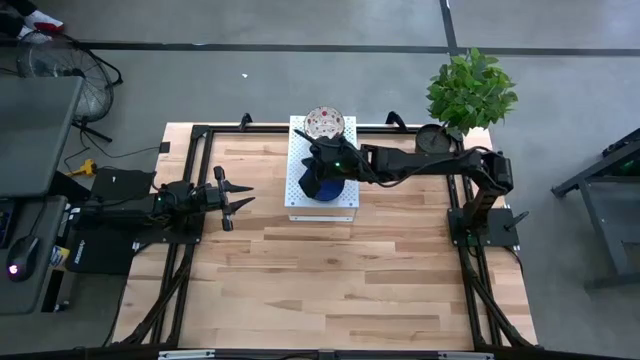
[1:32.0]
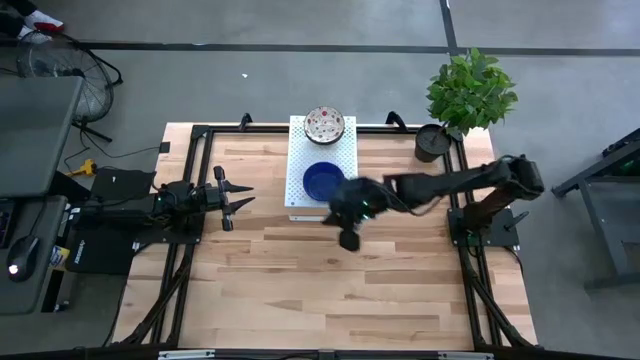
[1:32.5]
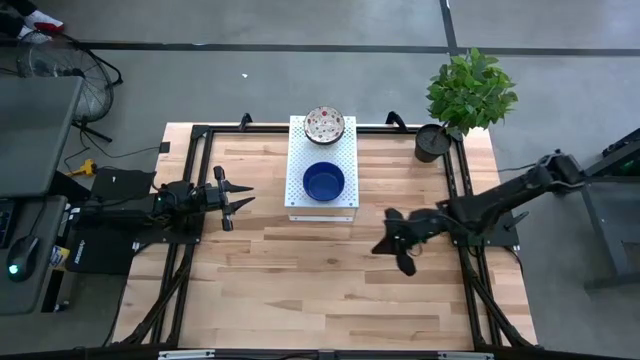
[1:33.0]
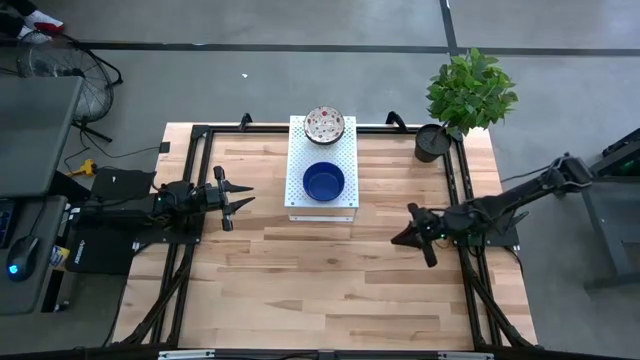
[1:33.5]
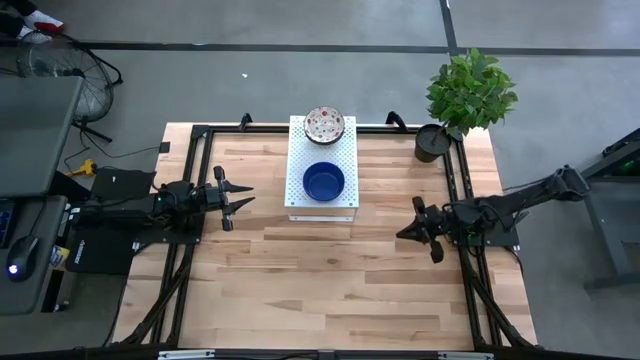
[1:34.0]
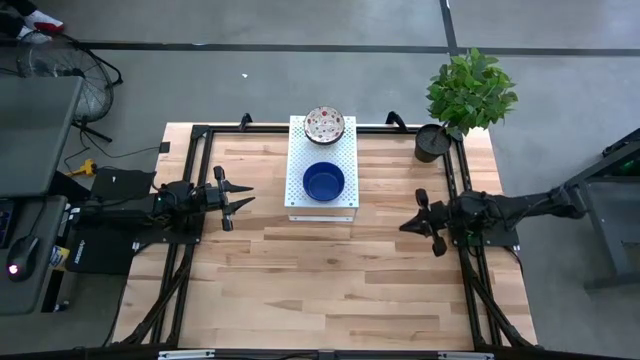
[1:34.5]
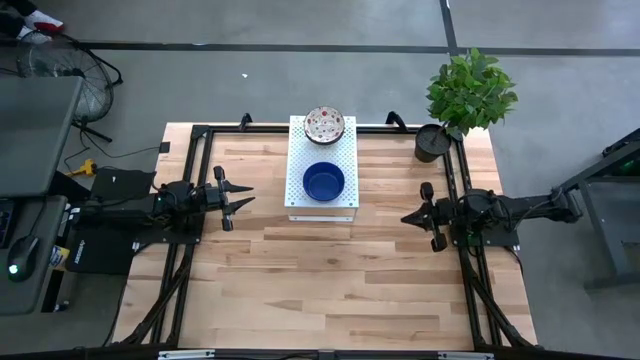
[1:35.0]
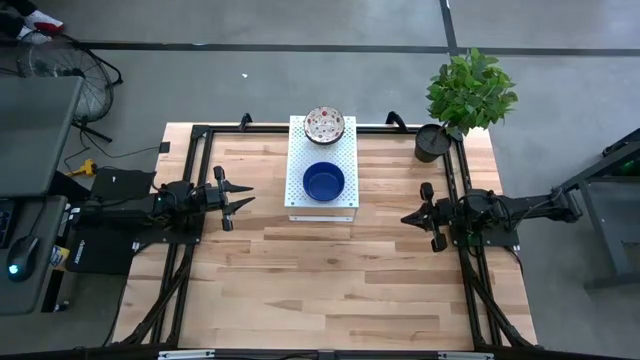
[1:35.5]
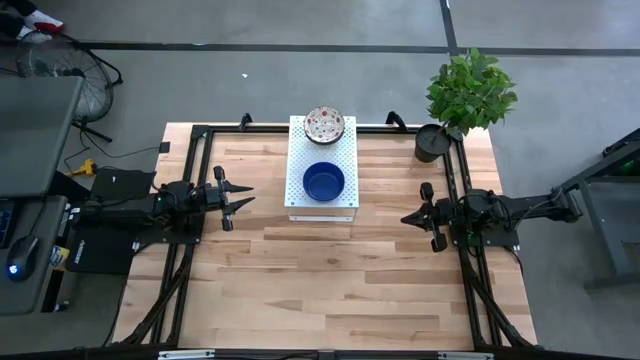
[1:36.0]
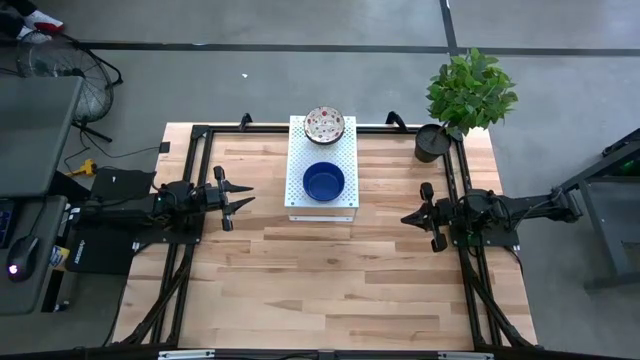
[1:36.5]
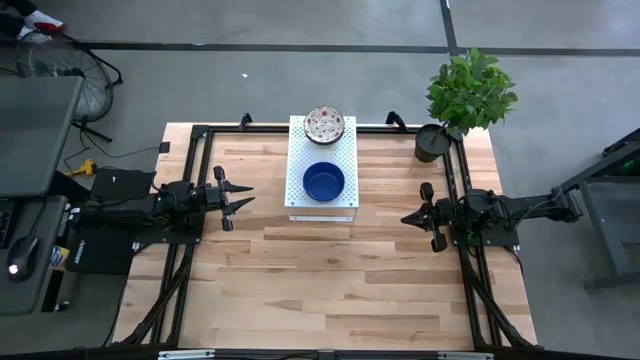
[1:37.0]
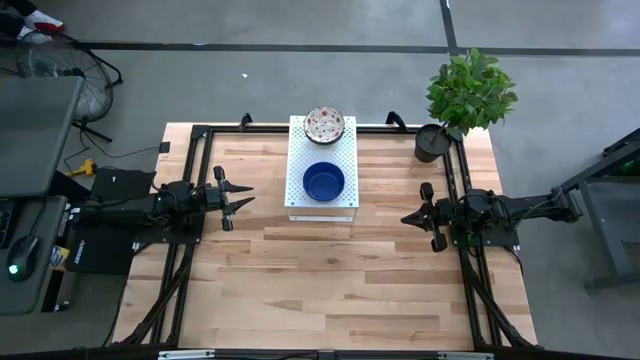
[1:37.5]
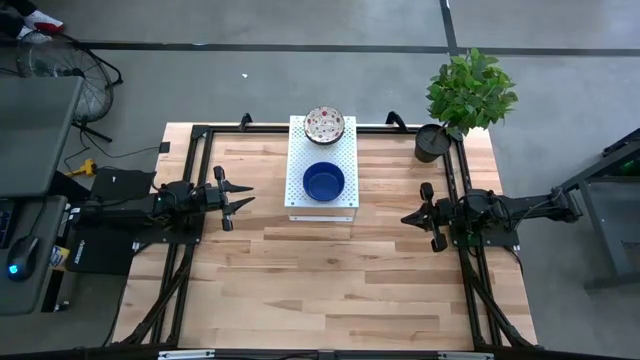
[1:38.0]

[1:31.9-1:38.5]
Task: Pick & Place Mini bowls
Return to Home Position

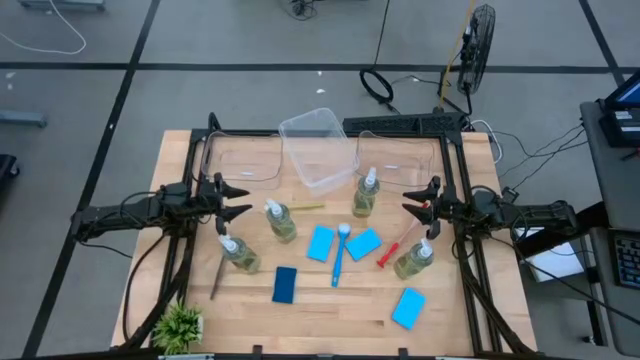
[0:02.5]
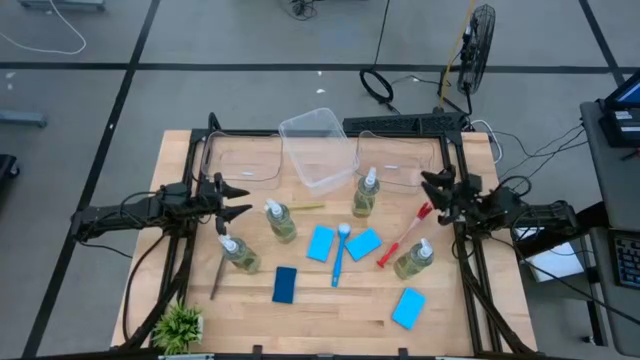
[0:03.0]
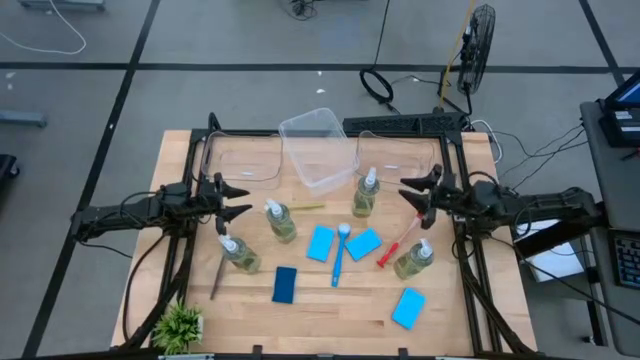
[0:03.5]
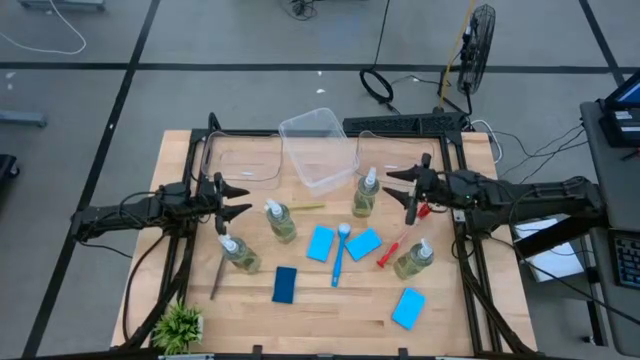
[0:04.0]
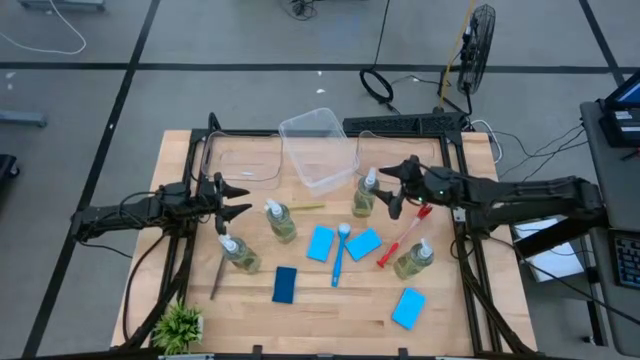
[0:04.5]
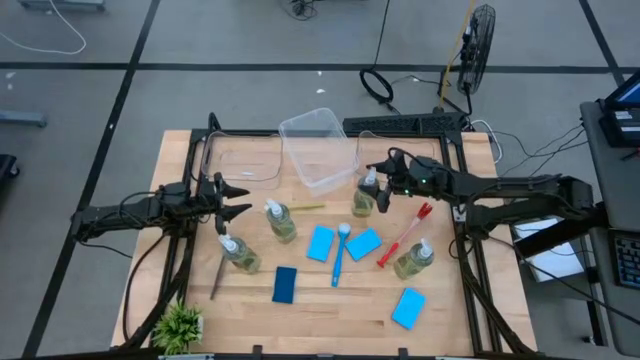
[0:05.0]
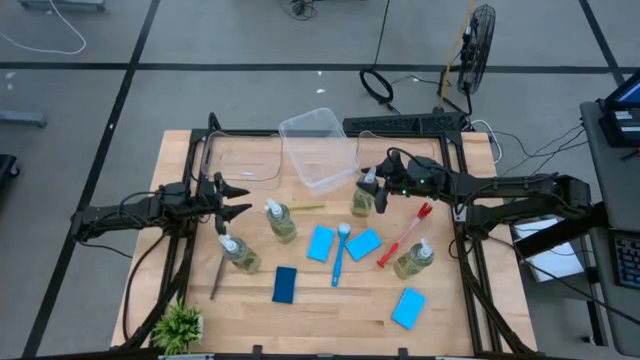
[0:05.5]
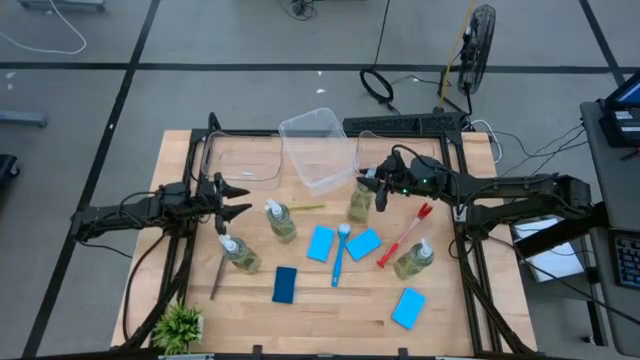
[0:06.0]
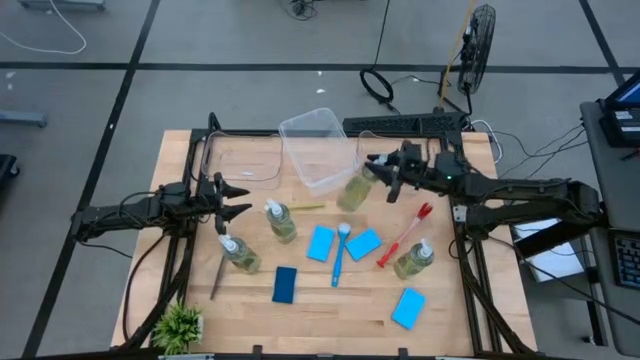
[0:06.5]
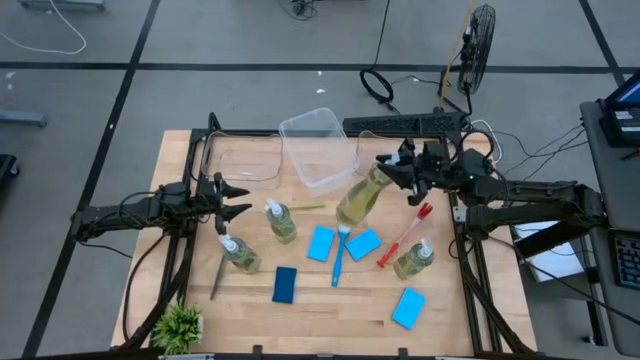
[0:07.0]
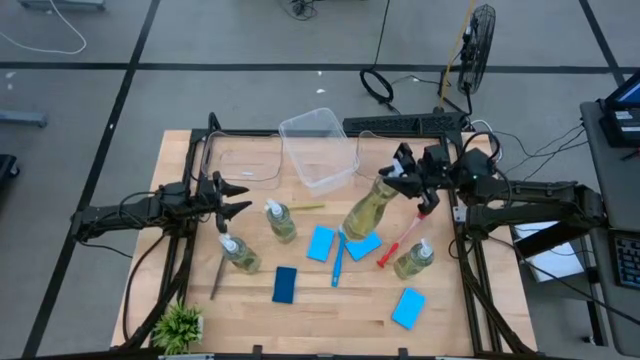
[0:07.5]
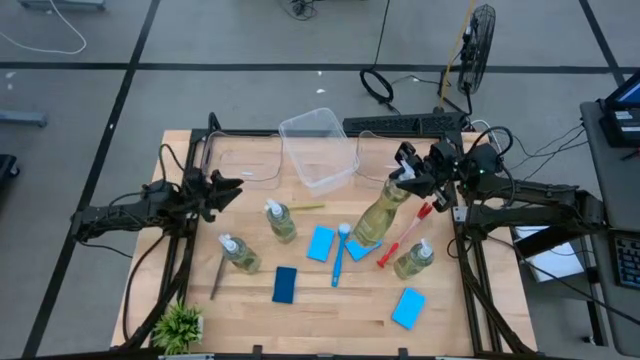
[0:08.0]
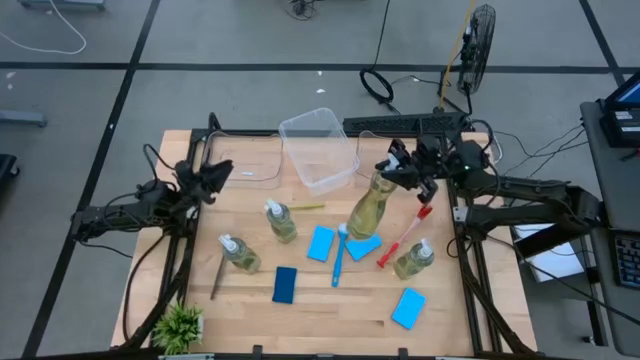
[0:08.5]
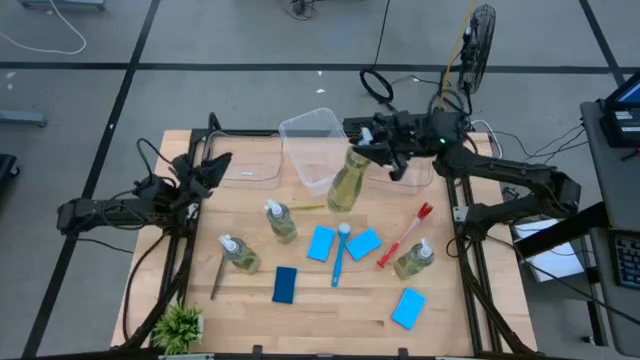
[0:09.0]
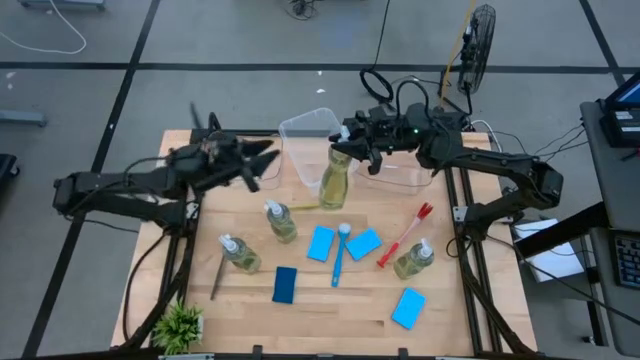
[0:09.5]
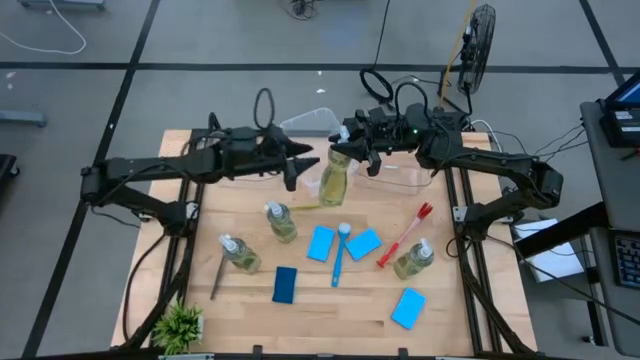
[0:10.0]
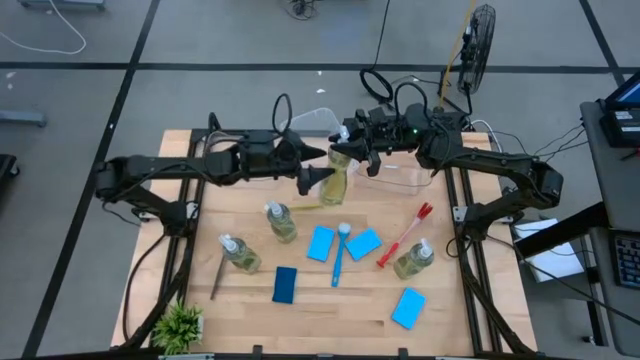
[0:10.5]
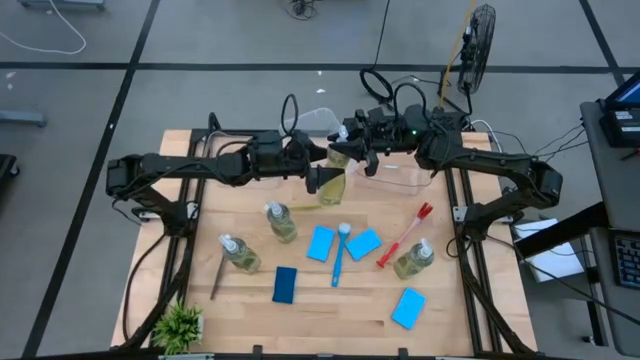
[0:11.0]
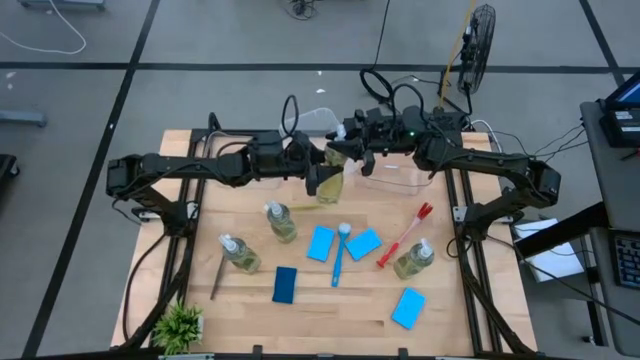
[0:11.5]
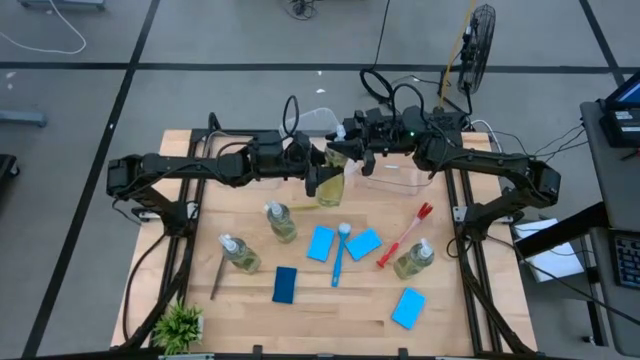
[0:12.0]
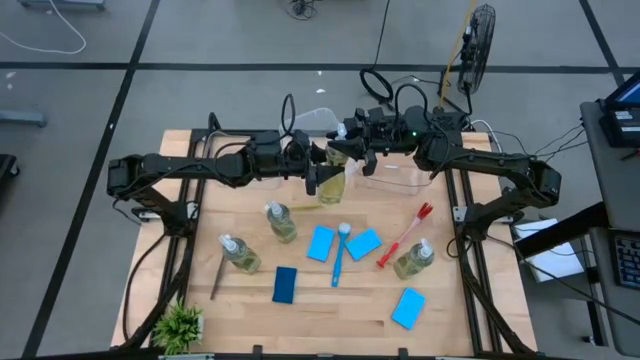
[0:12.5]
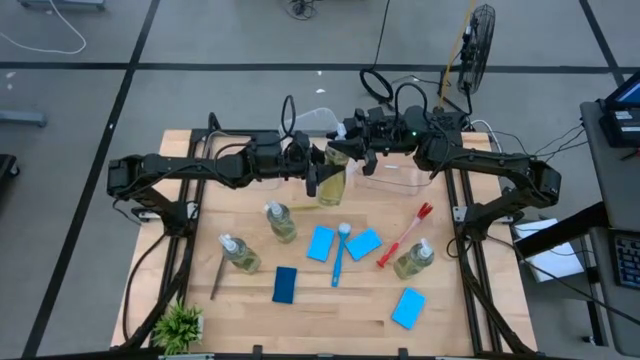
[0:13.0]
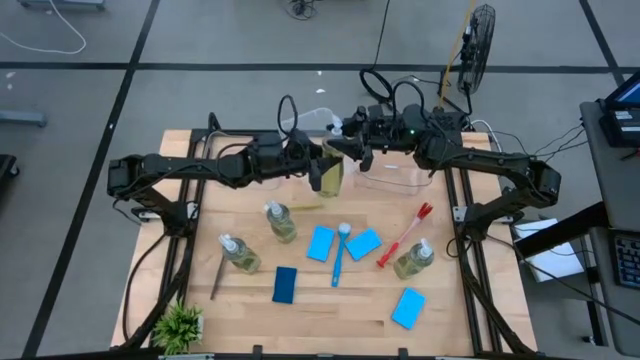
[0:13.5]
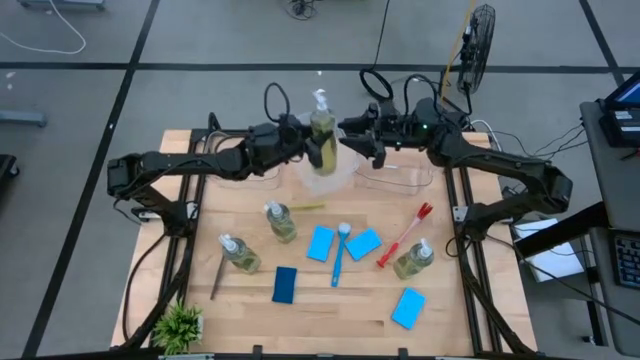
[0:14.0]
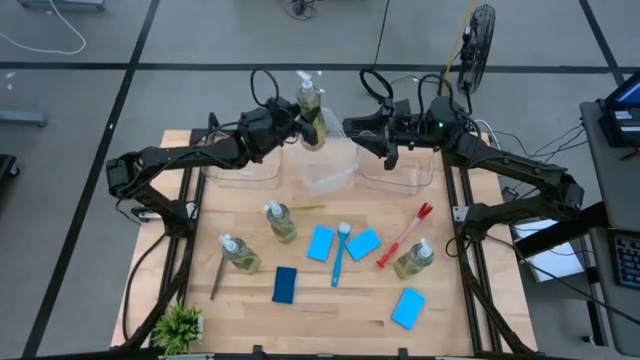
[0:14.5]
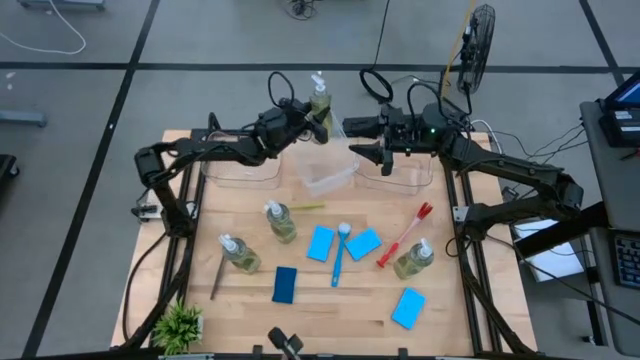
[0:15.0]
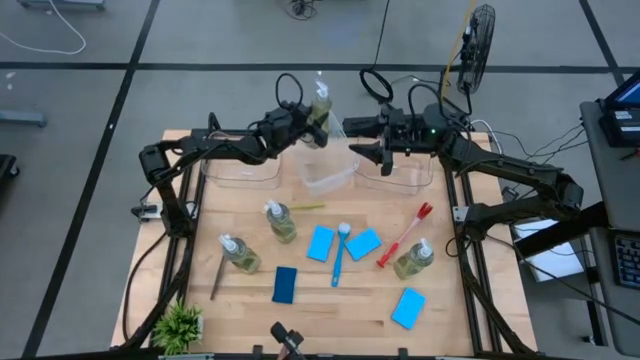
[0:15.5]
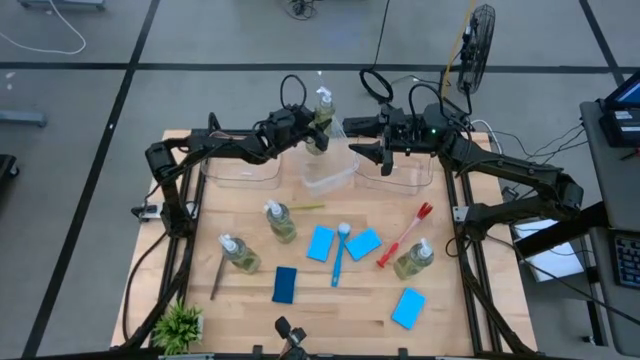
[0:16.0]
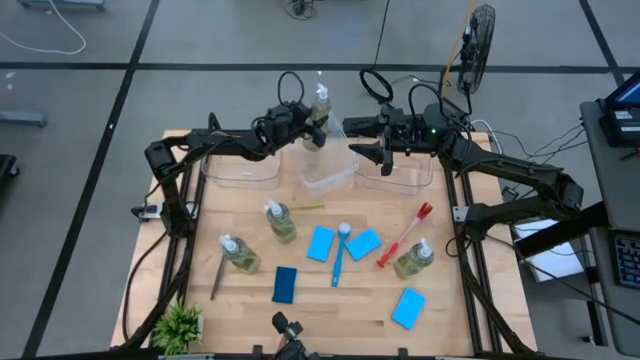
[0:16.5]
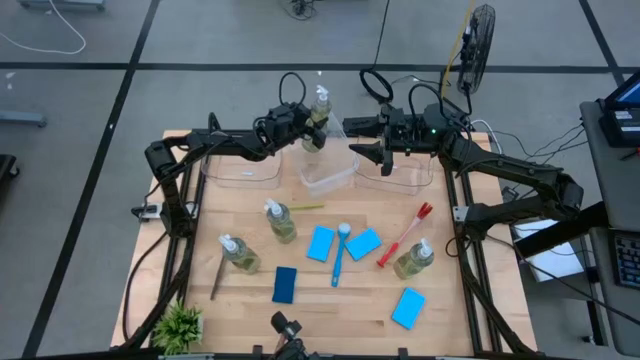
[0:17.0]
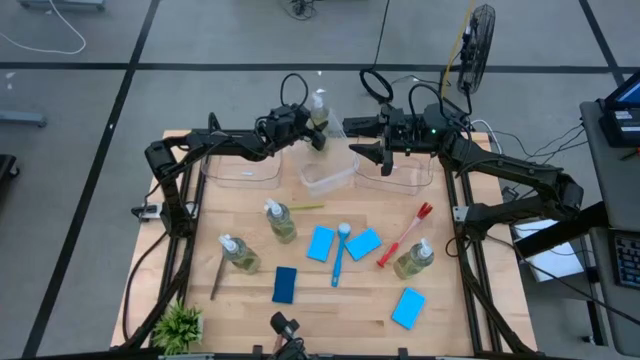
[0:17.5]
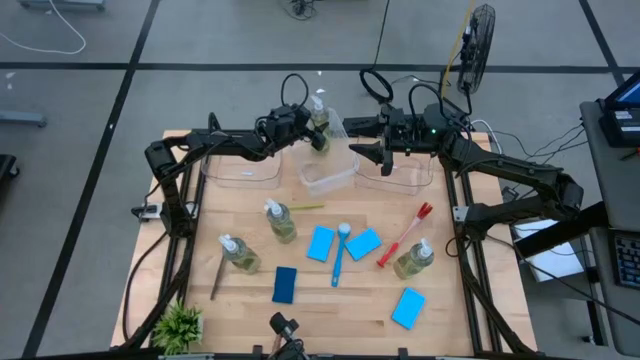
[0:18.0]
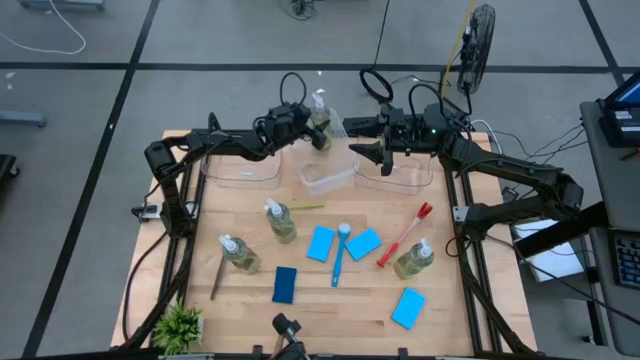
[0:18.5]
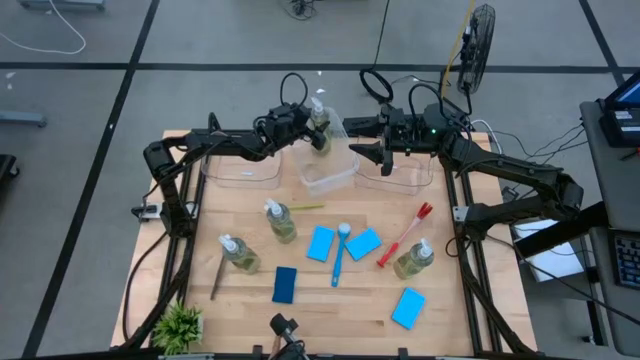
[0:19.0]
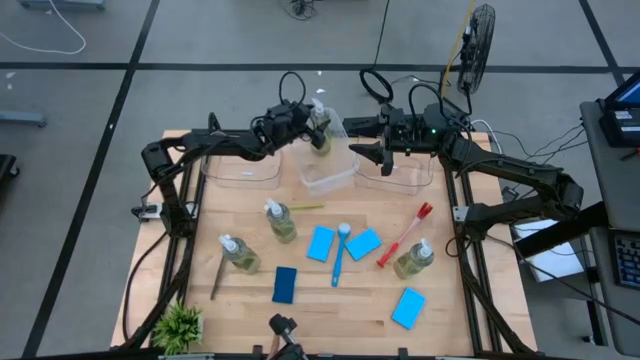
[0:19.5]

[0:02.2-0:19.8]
Task: Pick & Place Kitchen Sink Supplies
Put the yellow dish soap into the white bin
